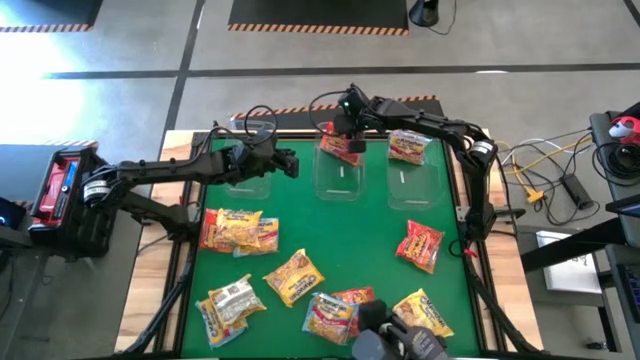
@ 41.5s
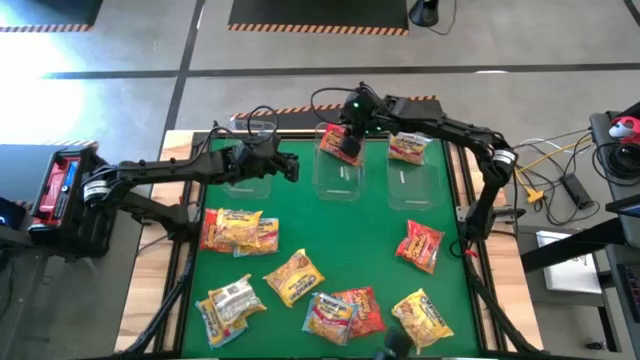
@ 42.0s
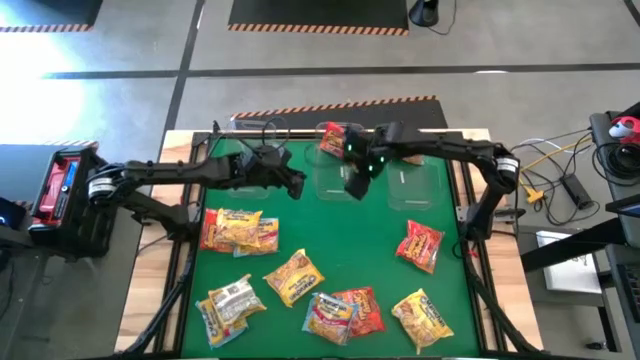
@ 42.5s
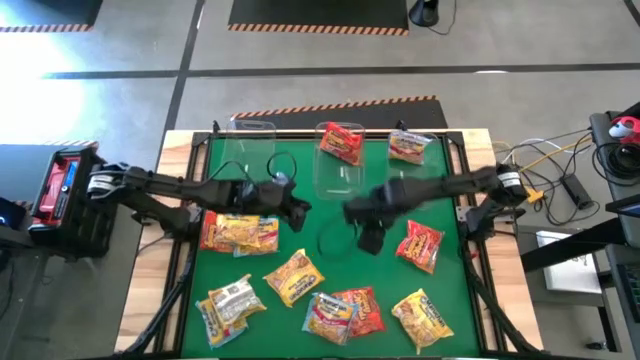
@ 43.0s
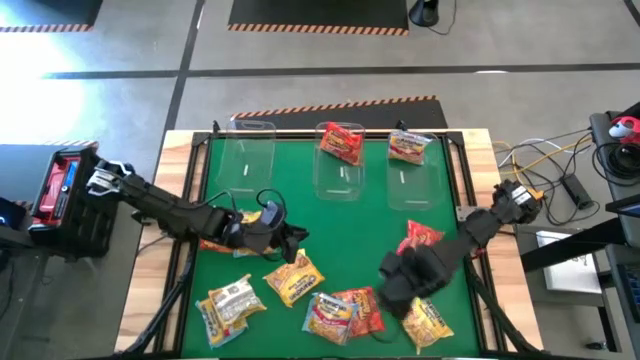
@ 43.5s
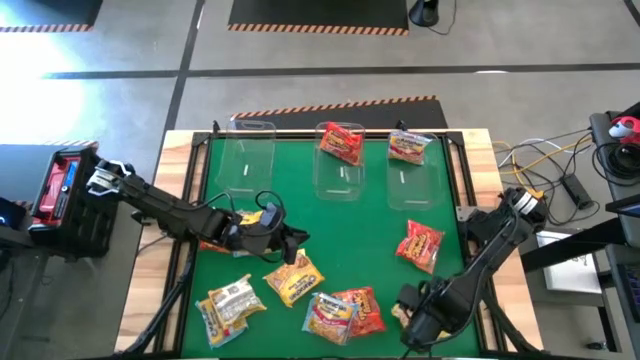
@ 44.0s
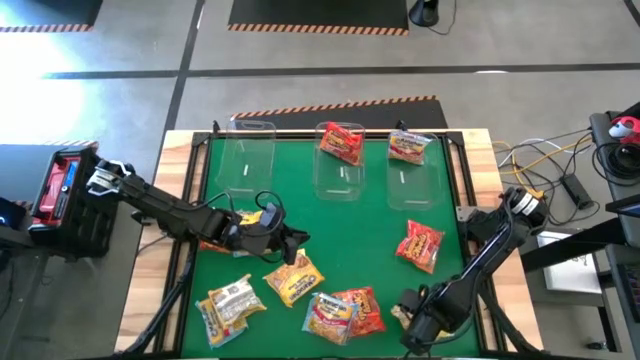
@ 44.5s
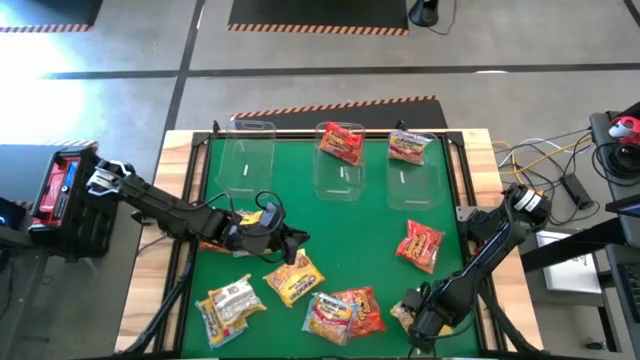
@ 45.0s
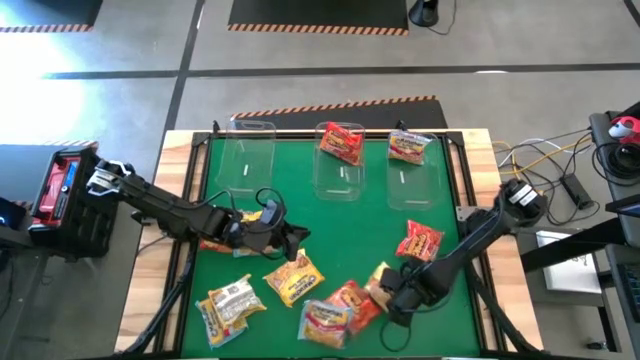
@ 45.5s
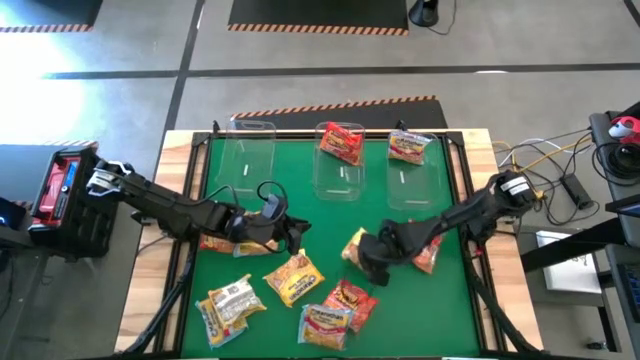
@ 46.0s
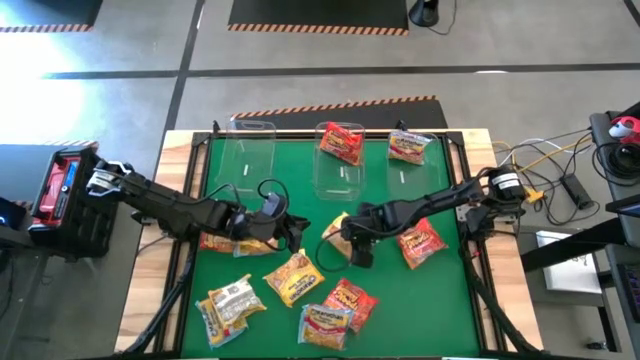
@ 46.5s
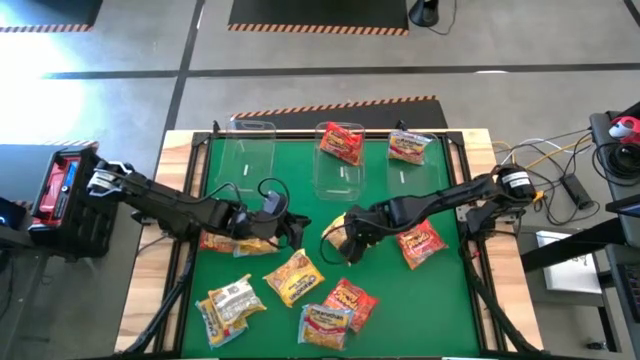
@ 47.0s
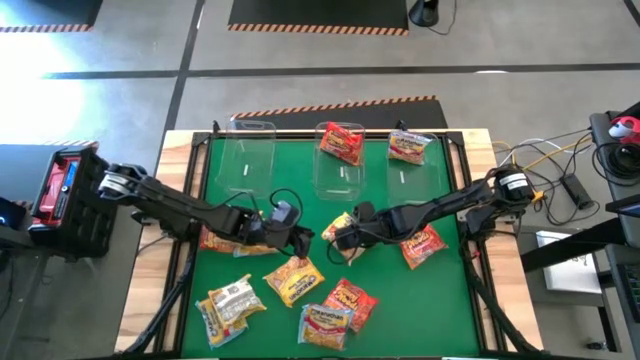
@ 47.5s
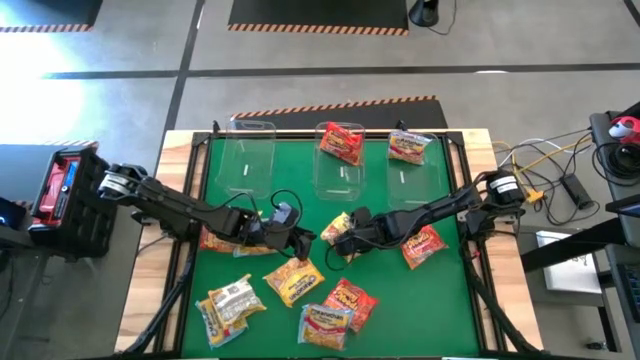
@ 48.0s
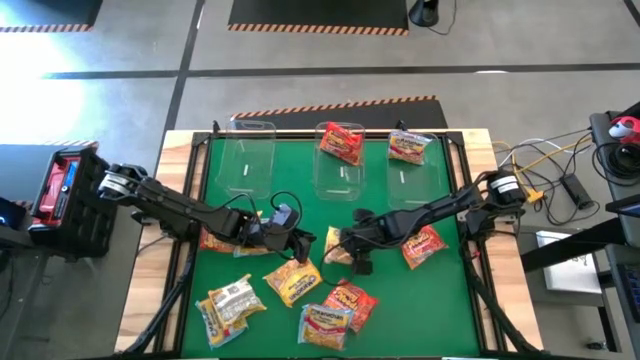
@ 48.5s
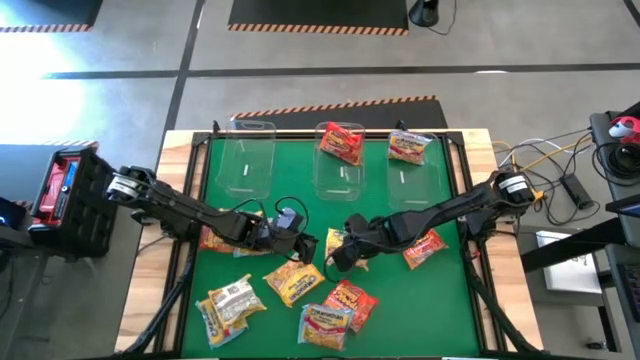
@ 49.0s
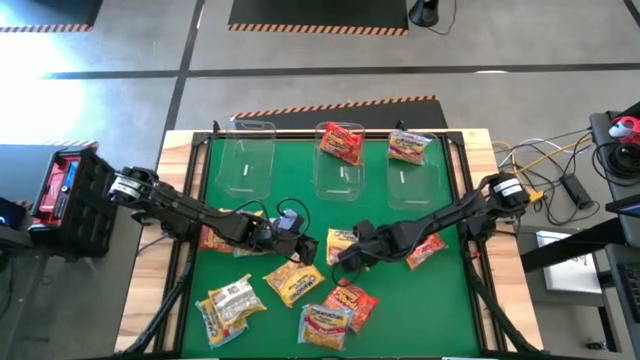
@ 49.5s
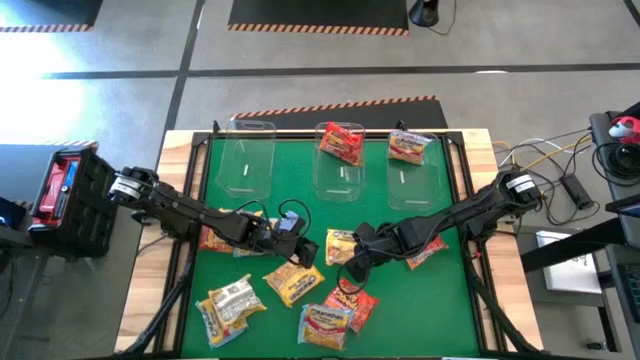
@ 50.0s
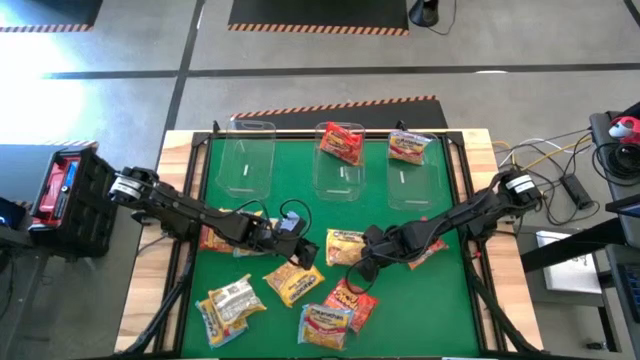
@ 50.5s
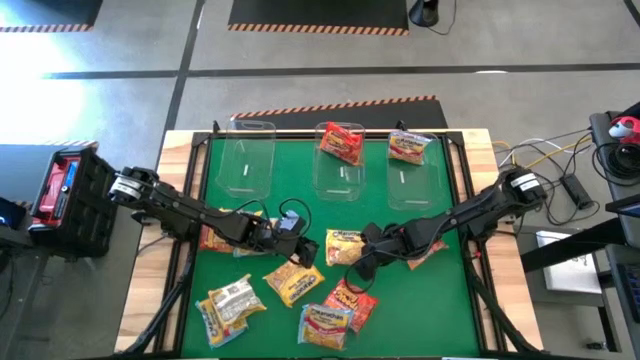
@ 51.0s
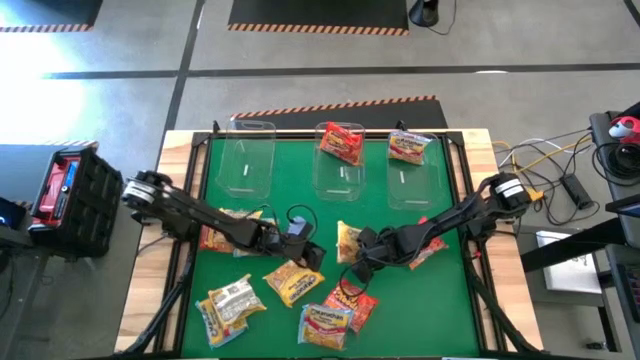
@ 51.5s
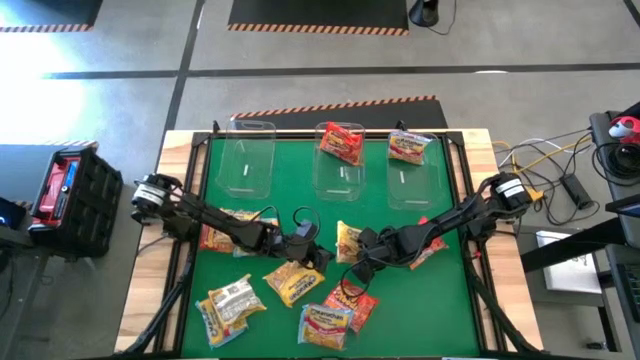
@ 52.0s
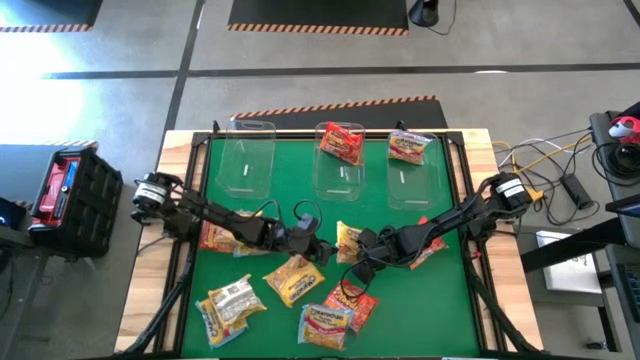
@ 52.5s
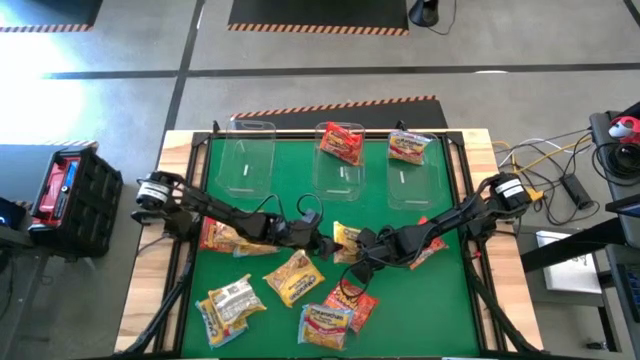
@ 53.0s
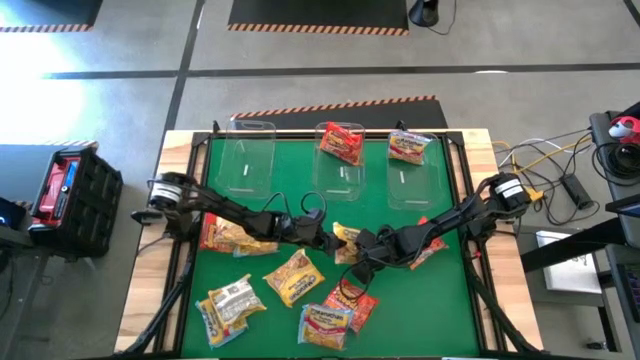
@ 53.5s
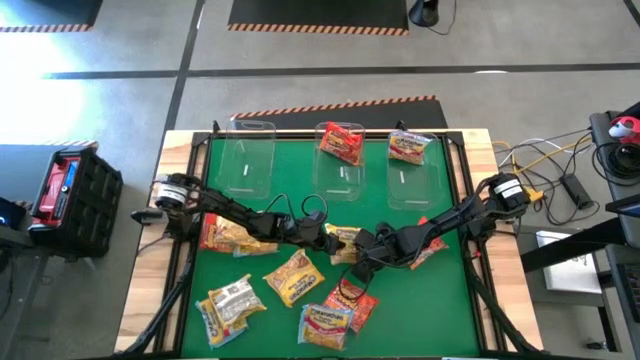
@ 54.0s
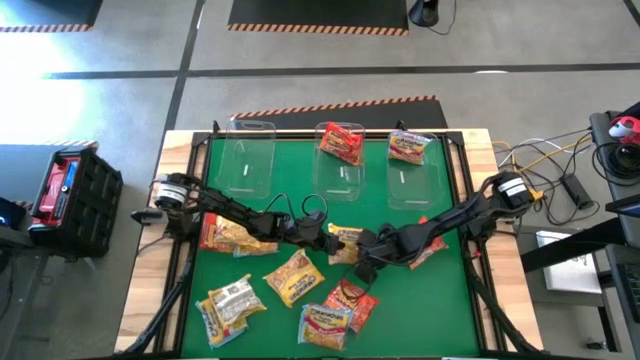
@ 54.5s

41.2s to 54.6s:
Task: Sort Maruchan noodles
Put the yellow noodle pack into the left transparent bin

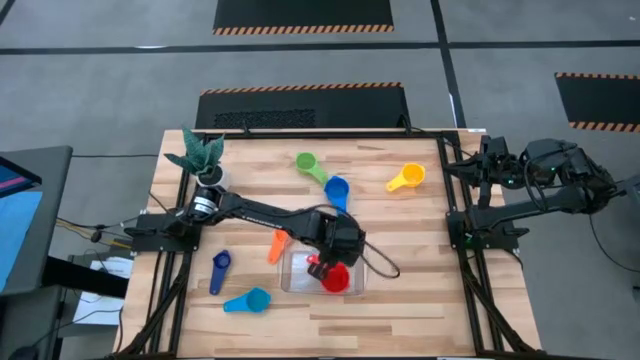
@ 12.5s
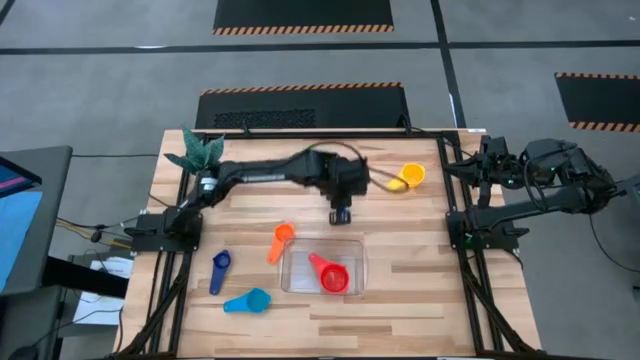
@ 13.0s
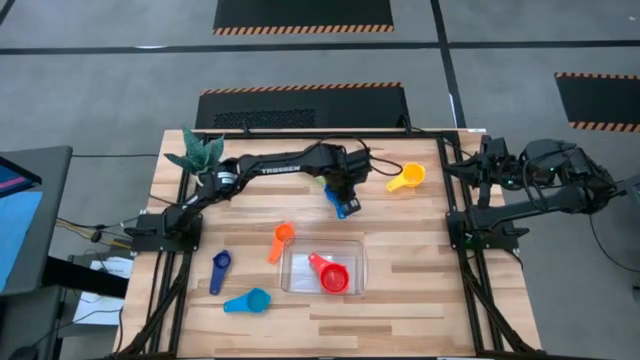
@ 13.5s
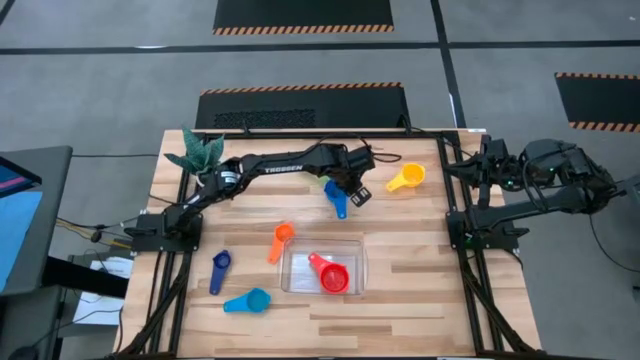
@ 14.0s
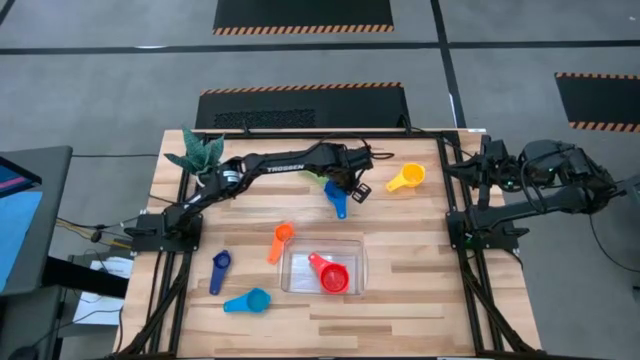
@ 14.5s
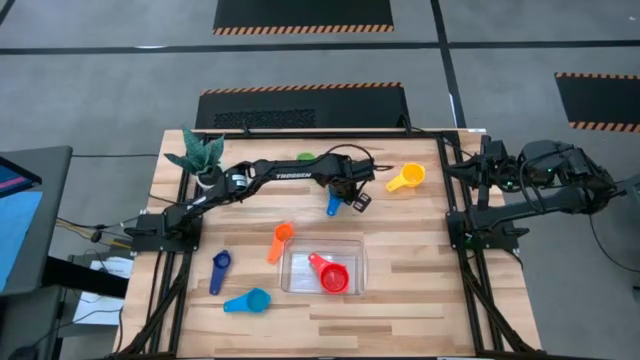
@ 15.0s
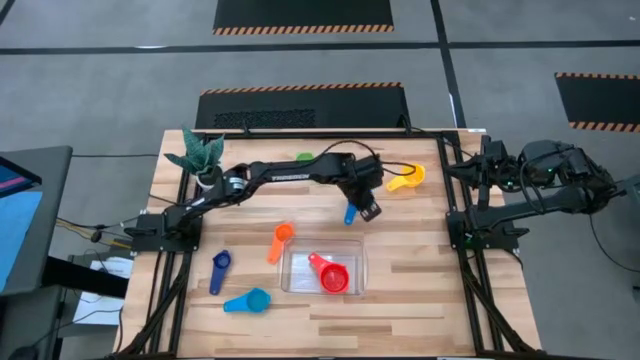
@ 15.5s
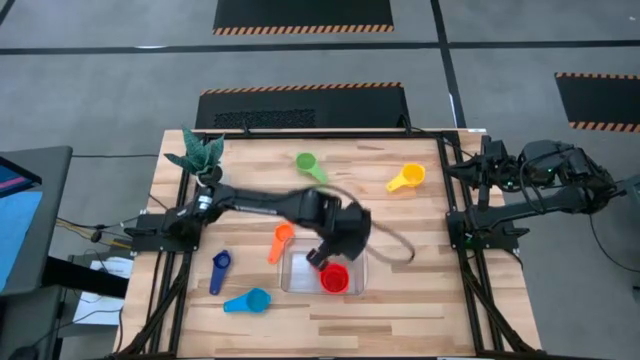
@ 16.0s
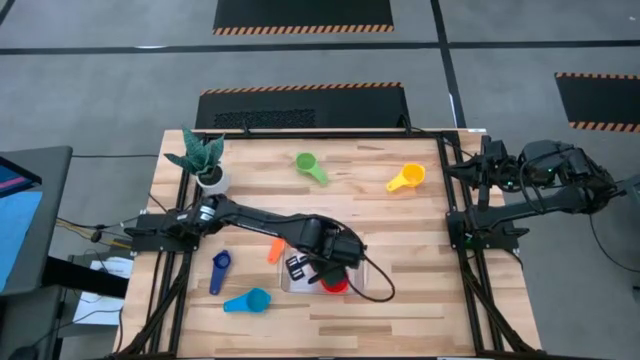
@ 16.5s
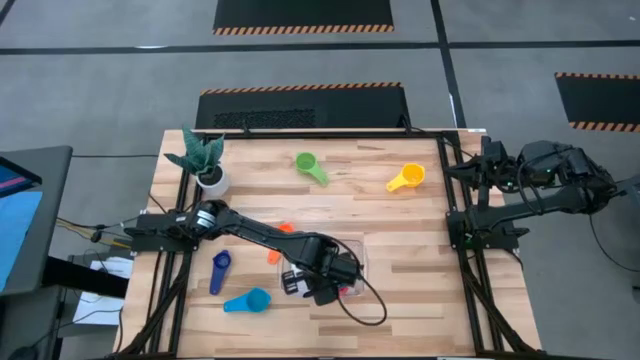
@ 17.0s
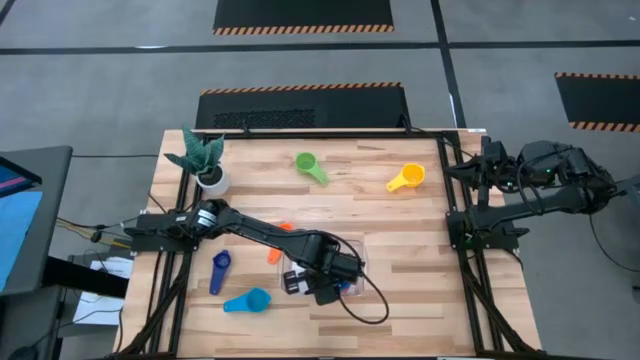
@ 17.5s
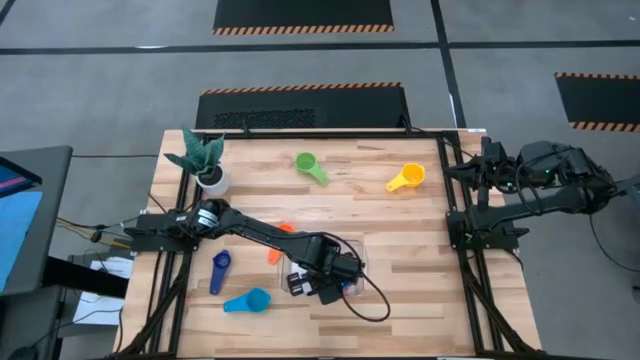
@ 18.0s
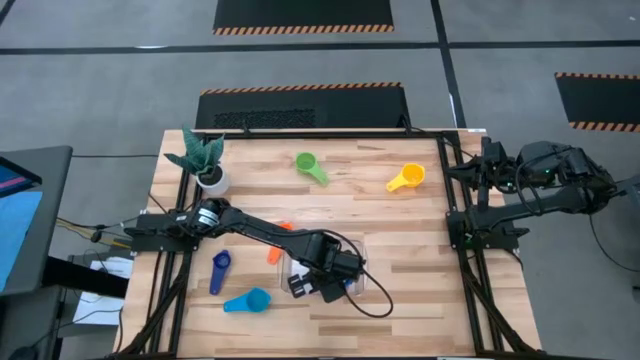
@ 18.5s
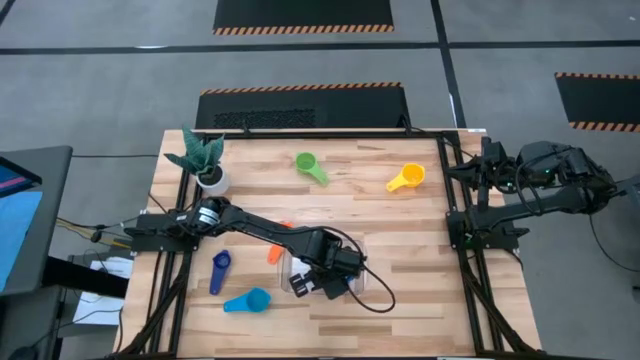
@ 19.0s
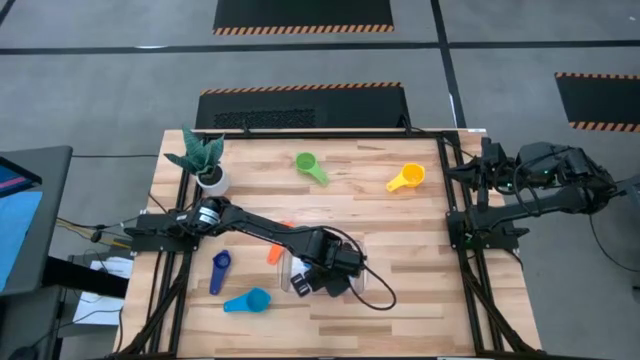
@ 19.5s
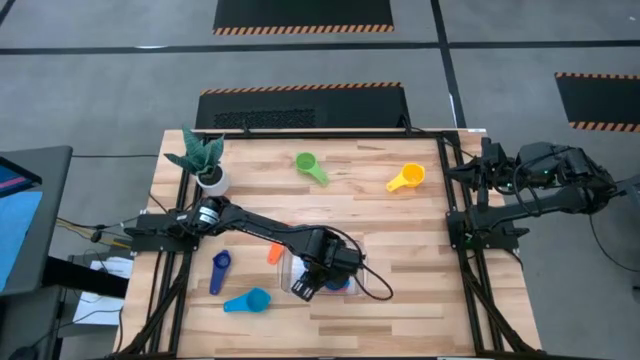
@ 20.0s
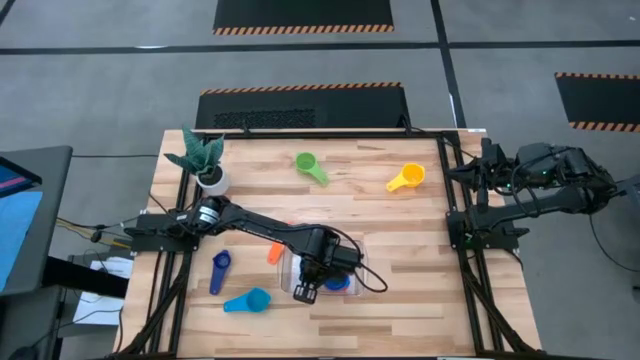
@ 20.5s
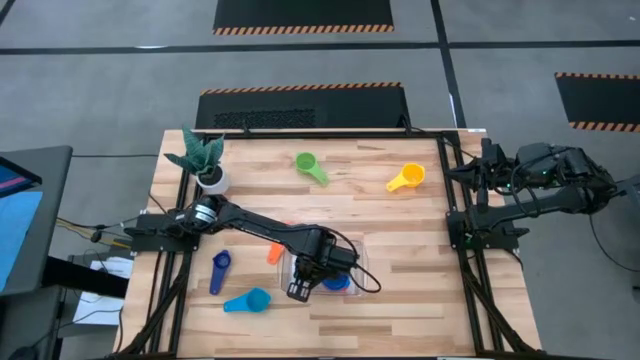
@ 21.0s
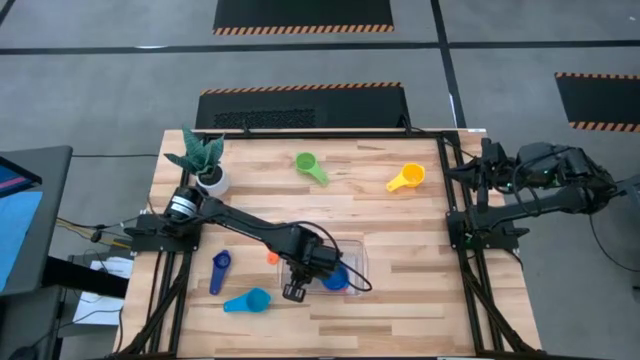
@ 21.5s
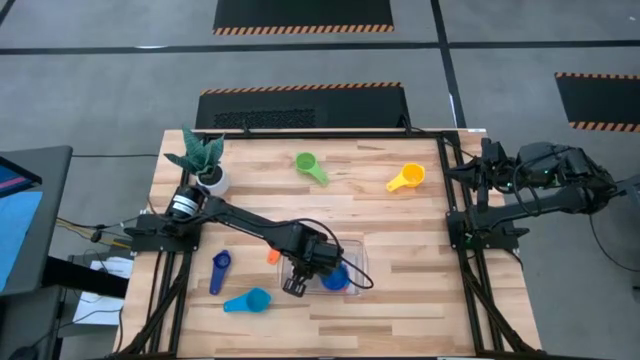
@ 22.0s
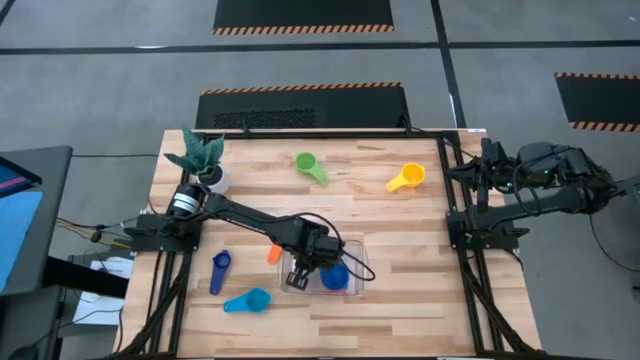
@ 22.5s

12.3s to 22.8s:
Task: Nest measuring cups in basket
Stack the blue measuring cup on top of the red measuring cup in the transparent bin
